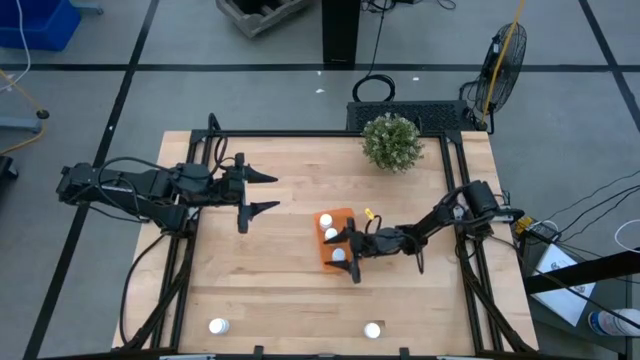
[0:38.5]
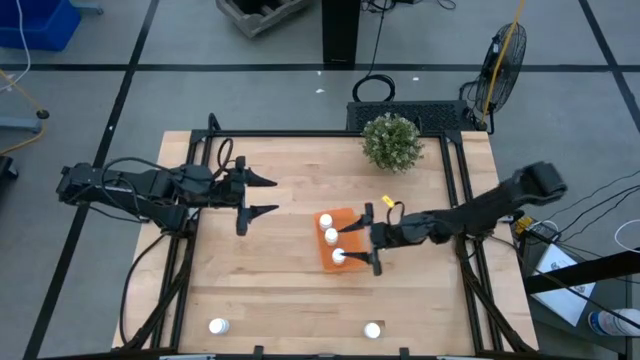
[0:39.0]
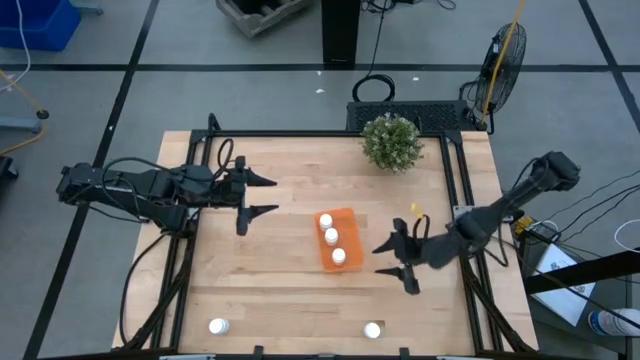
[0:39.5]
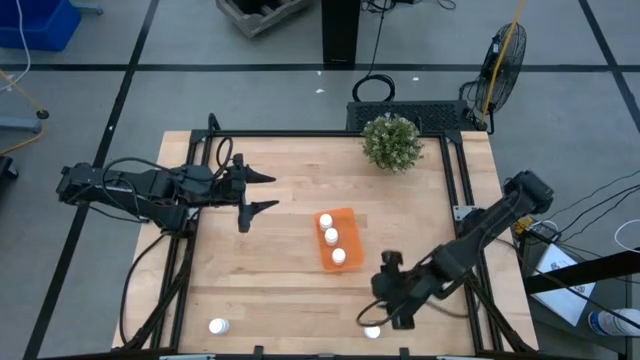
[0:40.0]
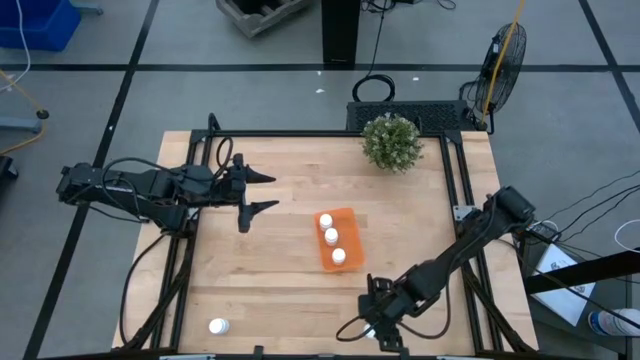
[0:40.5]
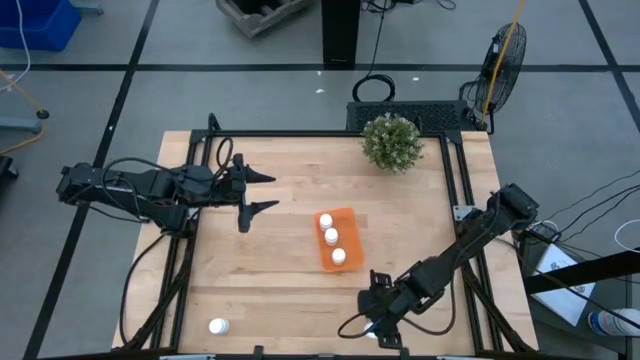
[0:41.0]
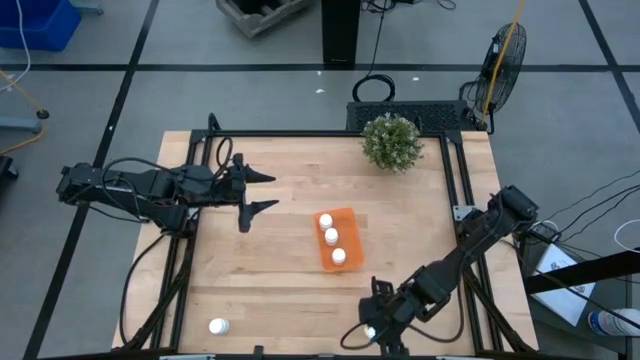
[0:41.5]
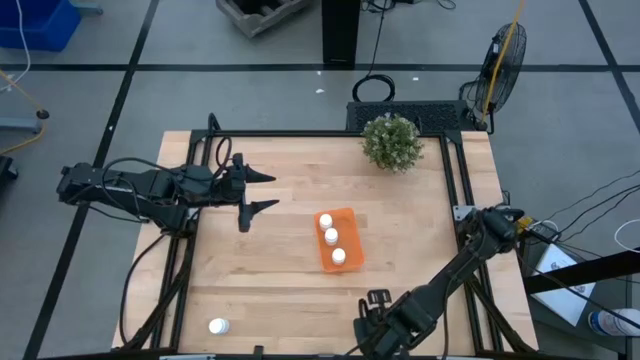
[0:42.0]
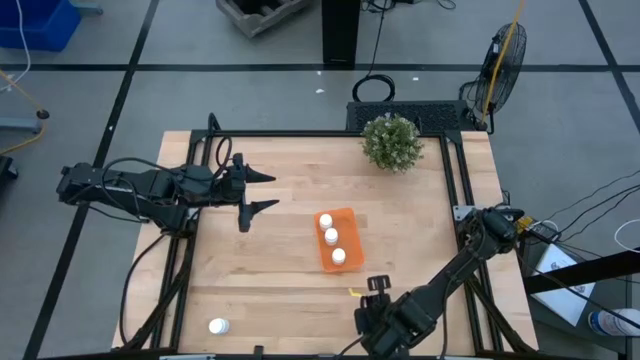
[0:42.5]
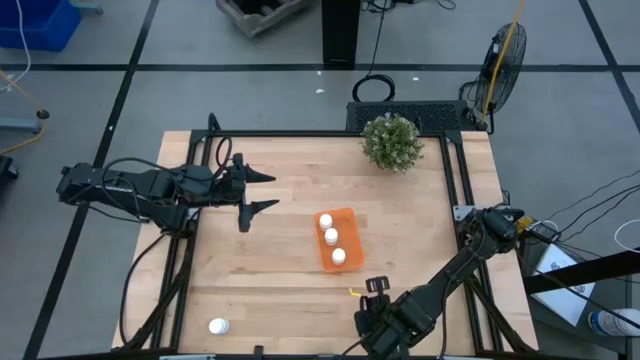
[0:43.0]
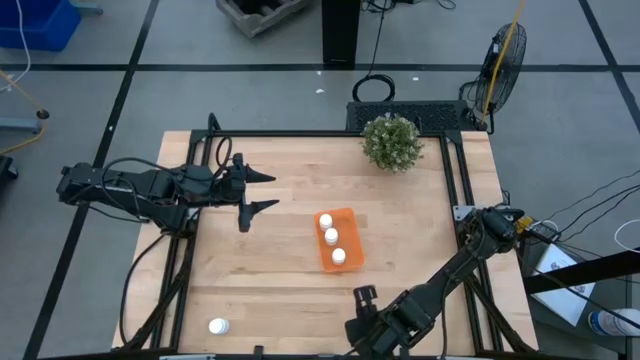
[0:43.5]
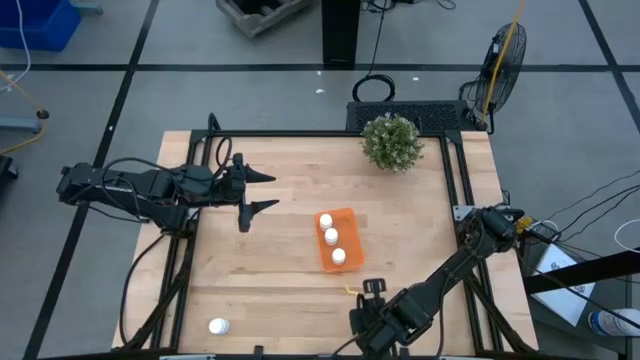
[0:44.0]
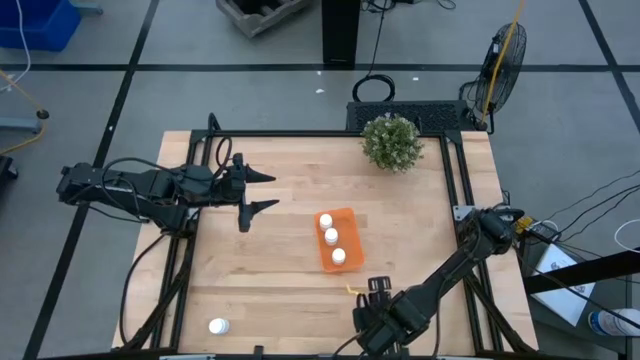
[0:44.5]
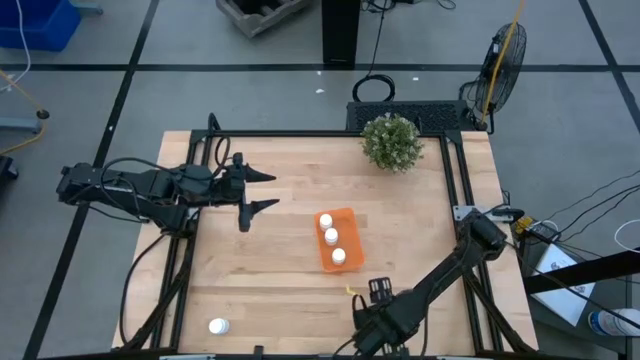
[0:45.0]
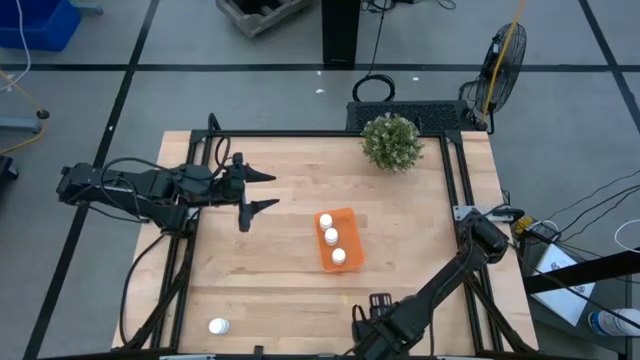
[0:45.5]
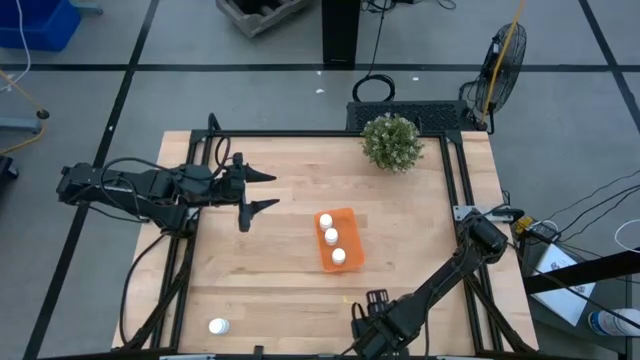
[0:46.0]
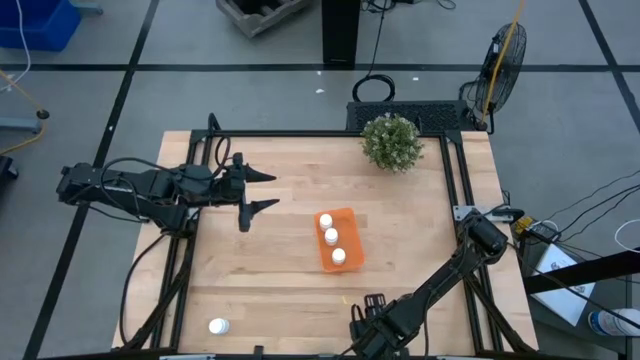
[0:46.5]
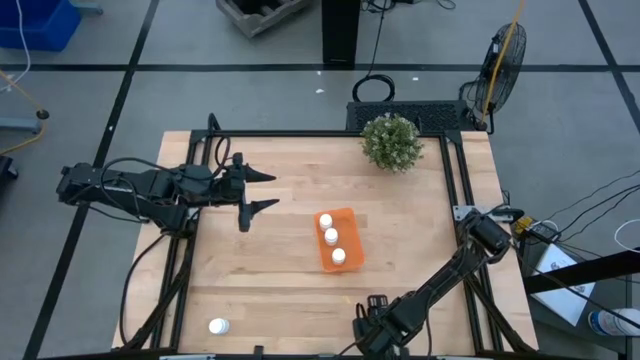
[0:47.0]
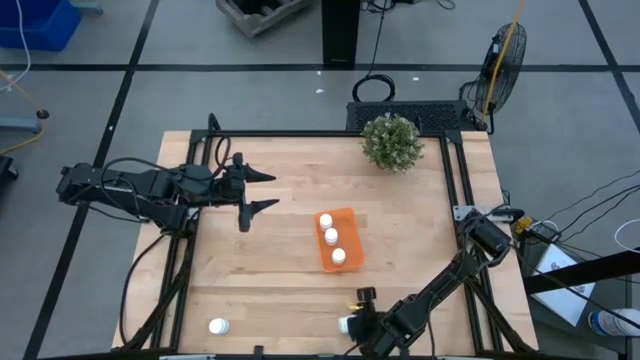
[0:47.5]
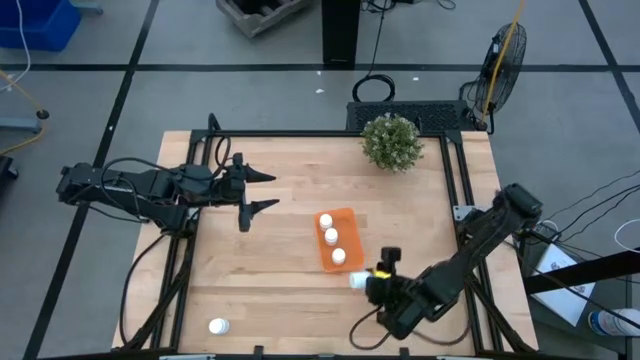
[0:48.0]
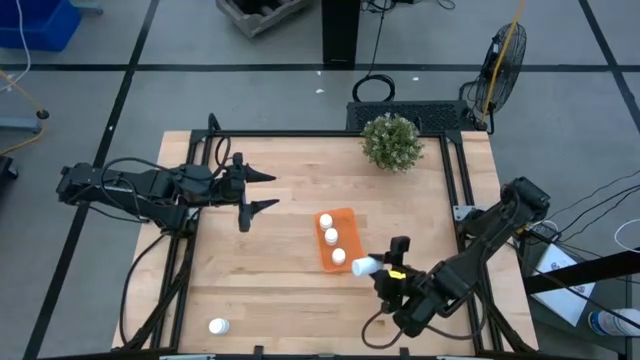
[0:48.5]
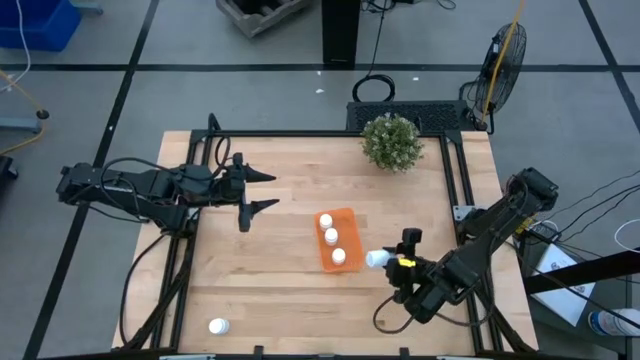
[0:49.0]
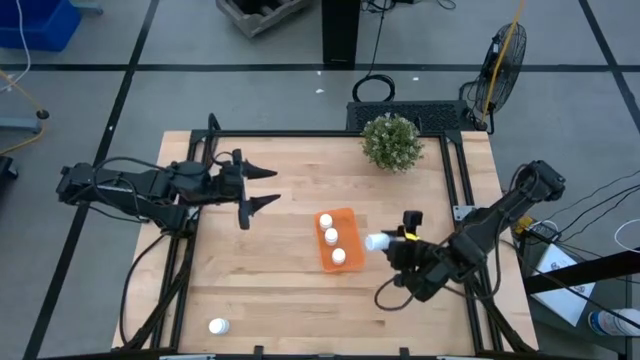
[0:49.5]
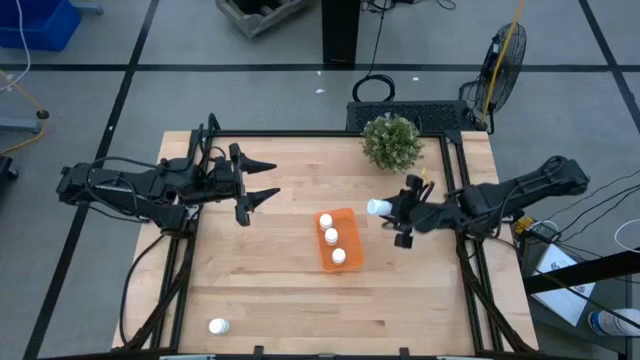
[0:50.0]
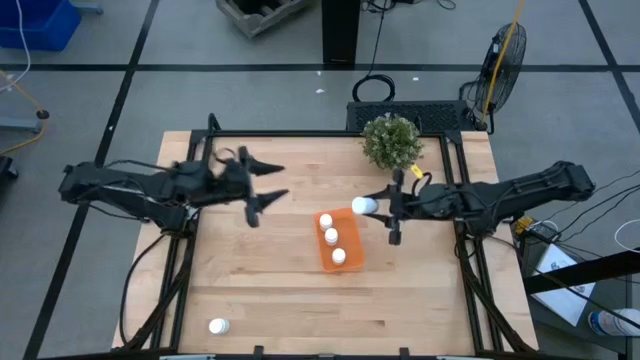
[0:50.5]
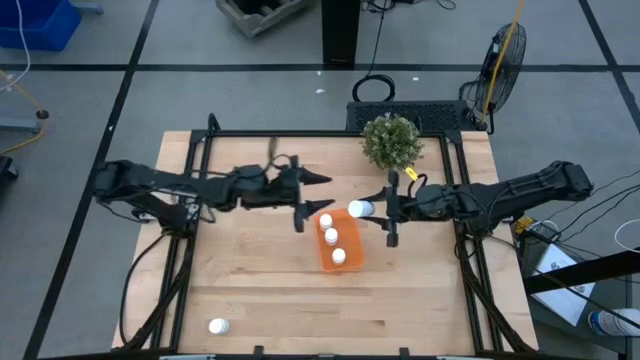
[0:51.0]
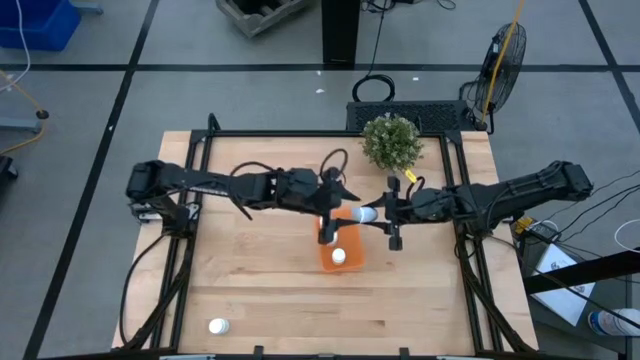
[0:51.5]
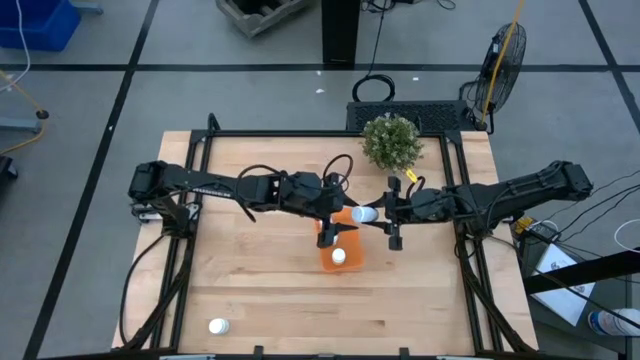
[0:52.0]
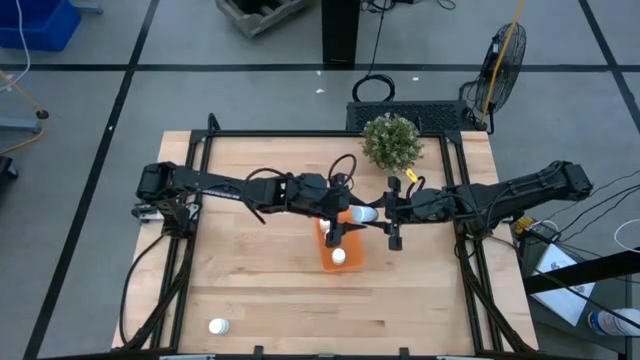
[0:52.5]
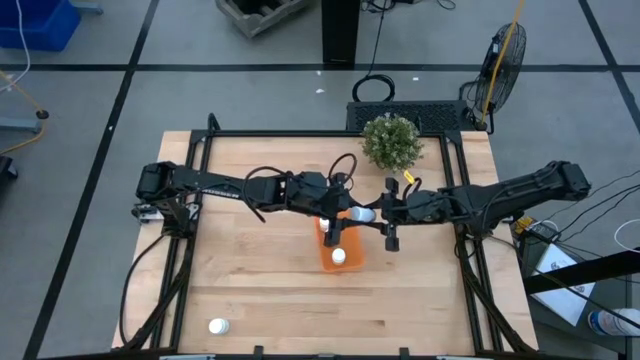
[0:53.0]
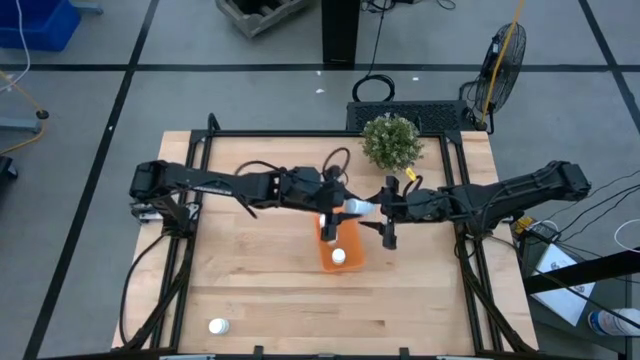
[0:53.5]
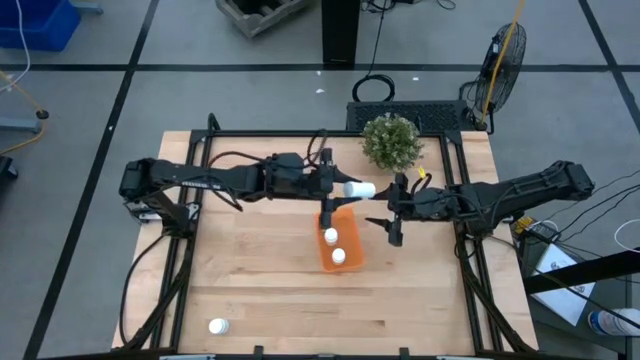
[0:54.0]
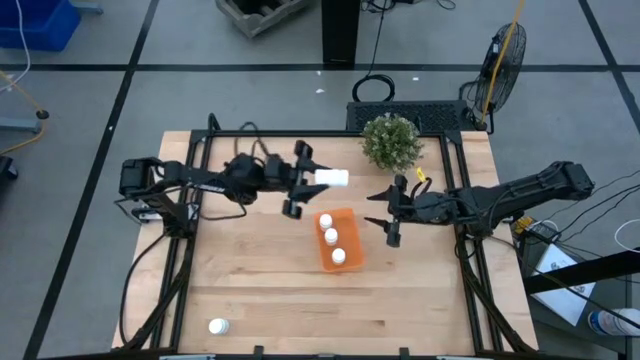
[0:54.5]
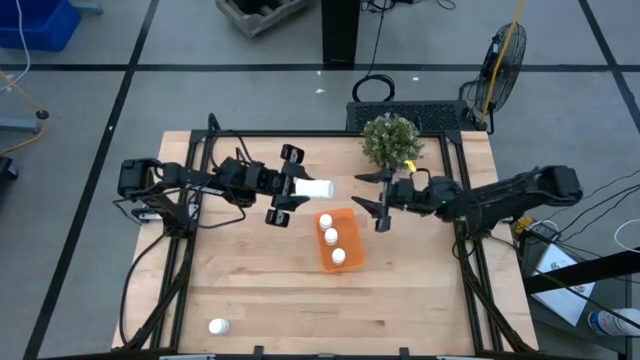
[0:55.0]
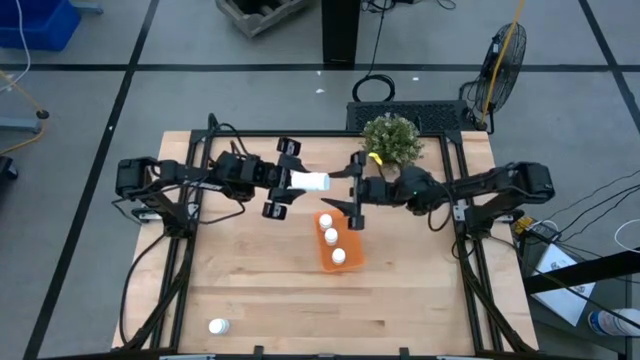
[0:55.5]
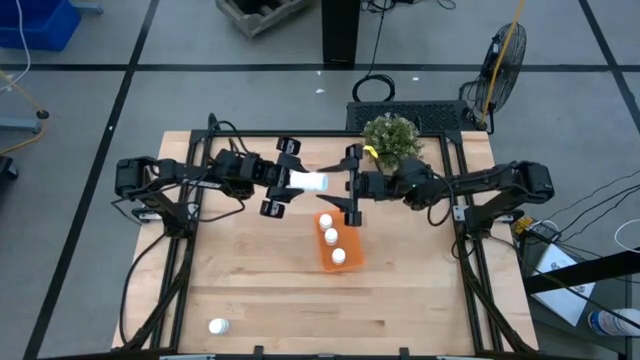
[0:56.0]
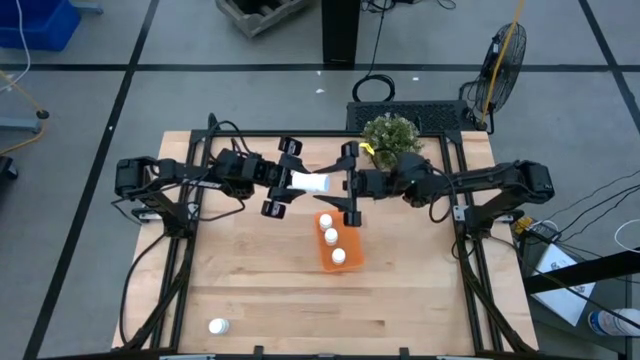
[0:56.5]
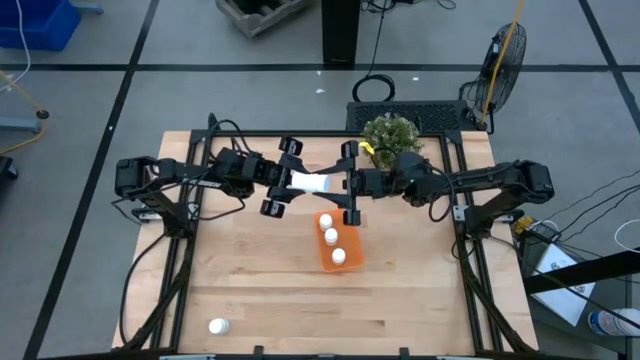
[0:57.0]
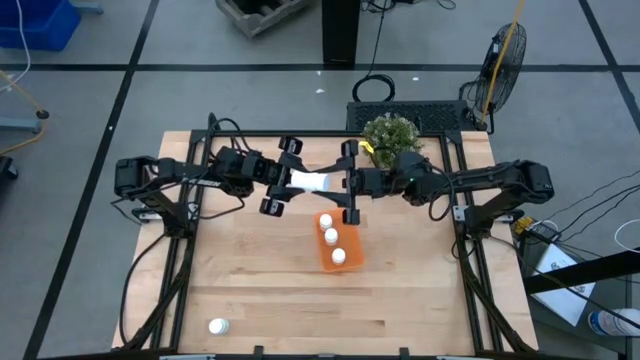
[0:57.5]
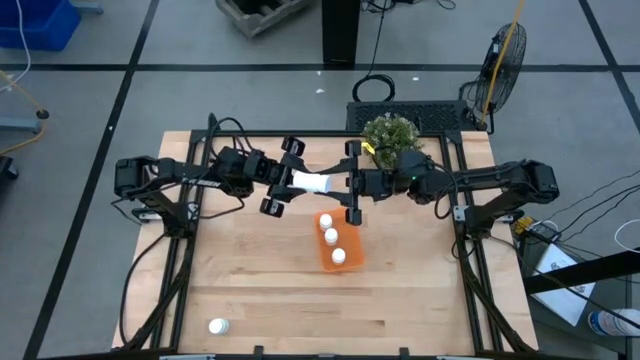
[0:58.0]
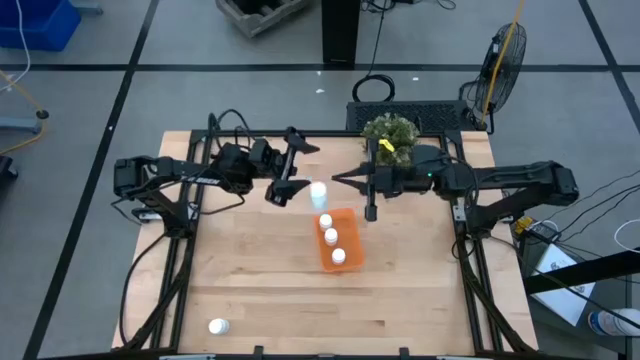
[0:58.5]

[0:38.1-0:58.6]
Task: Pick and place pill bottles into a basket
Put the white pill bottle into the orange container

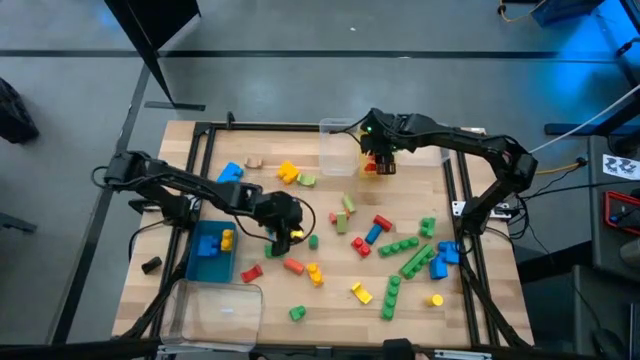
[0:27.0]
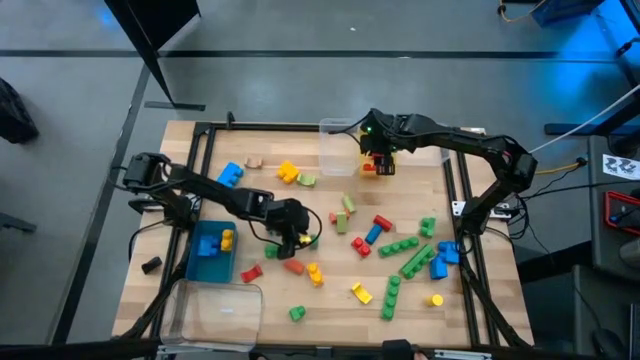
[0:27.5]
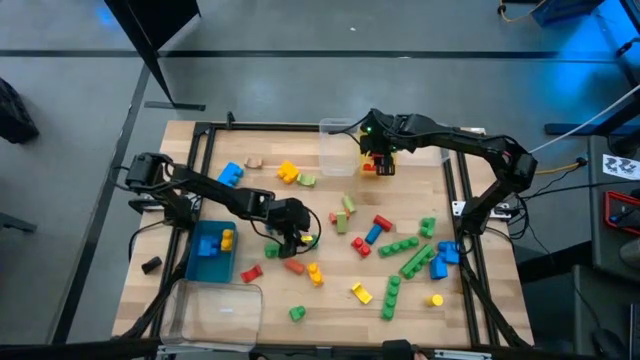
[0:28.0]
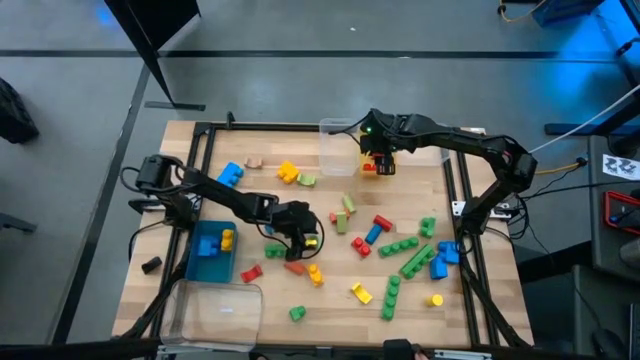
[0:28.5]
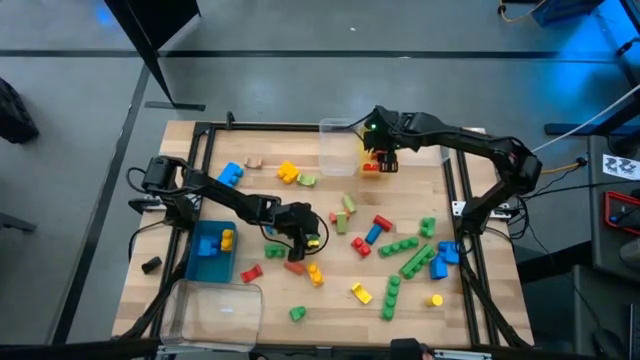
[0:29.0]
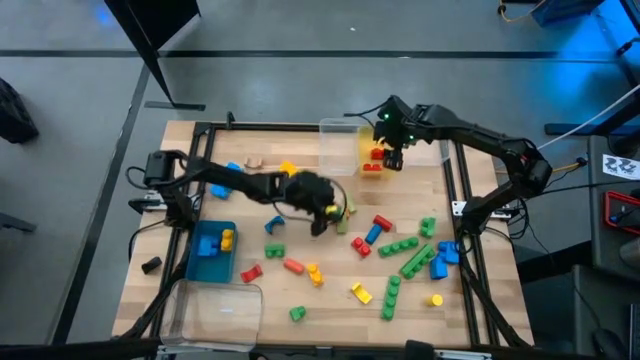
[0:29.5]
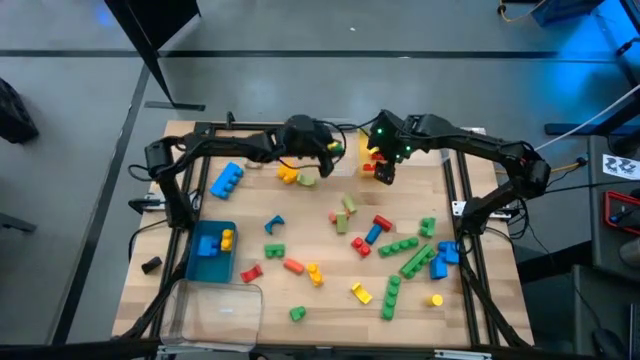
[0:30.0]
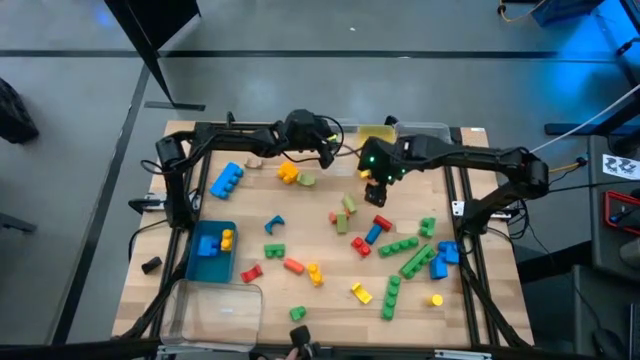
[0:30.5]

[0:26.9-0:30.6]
Task: Sort blocks by size
Put the green cylindrical block into the top left transparent bin
